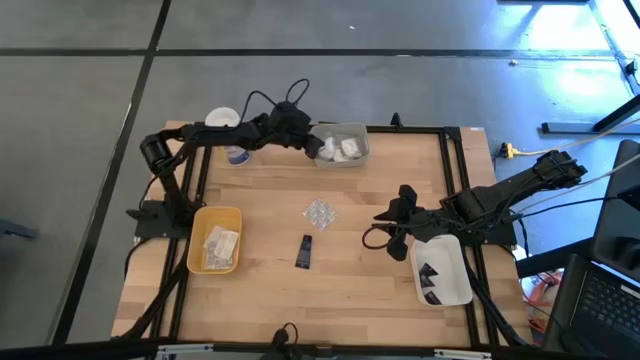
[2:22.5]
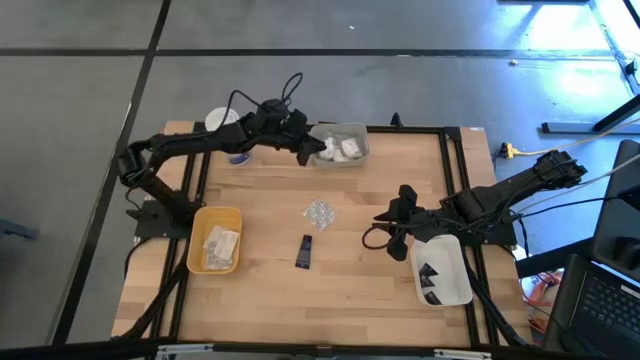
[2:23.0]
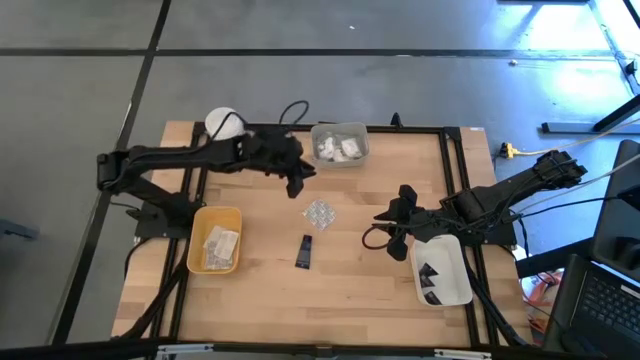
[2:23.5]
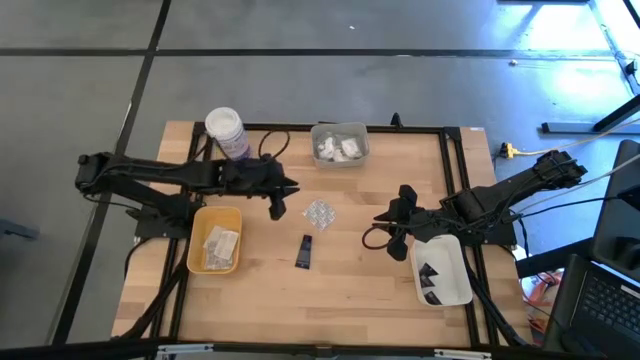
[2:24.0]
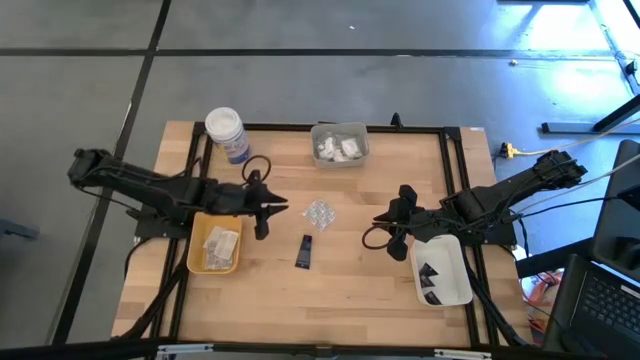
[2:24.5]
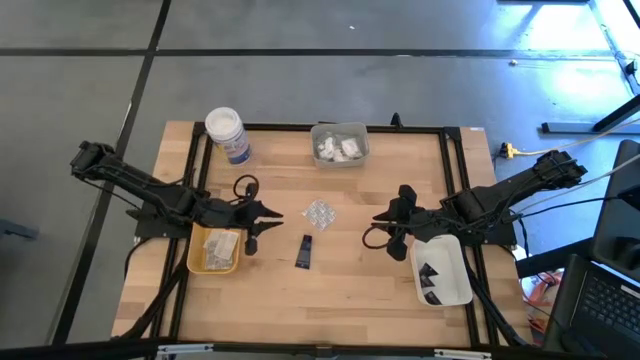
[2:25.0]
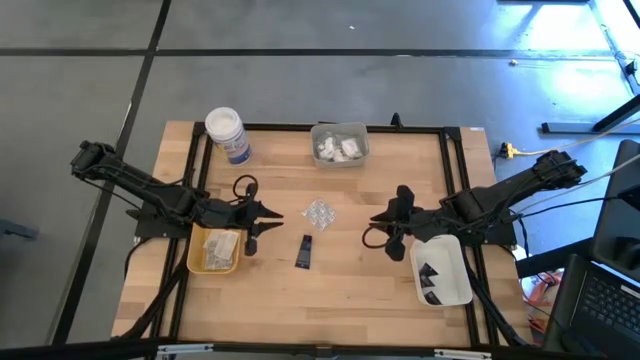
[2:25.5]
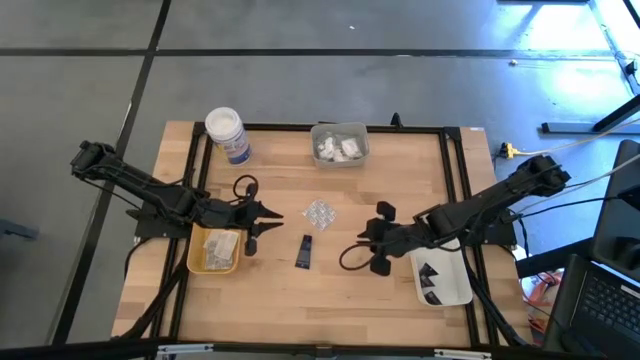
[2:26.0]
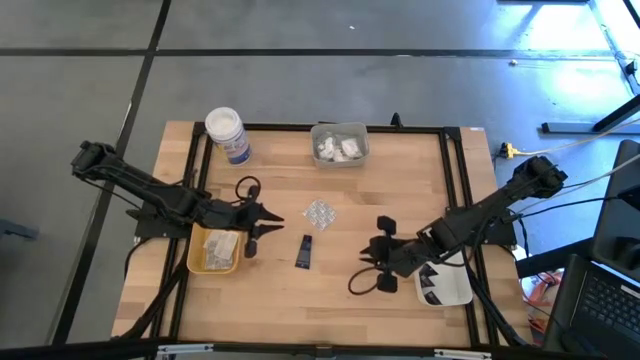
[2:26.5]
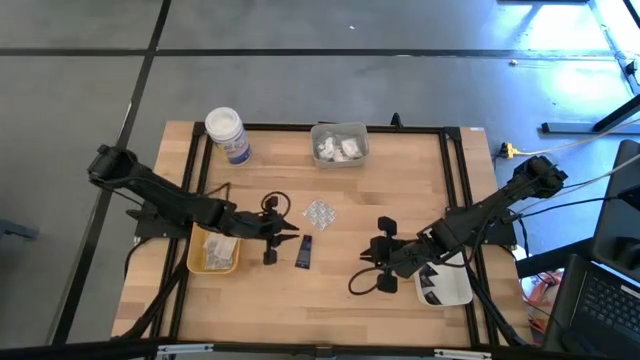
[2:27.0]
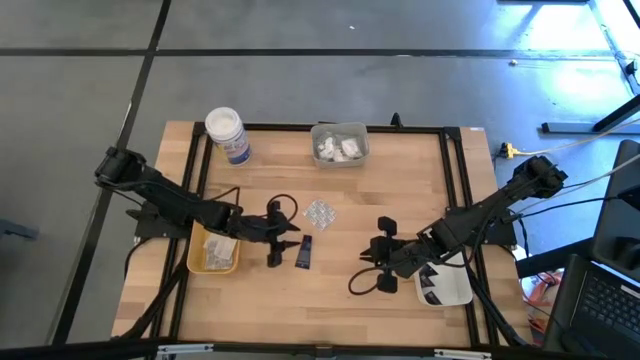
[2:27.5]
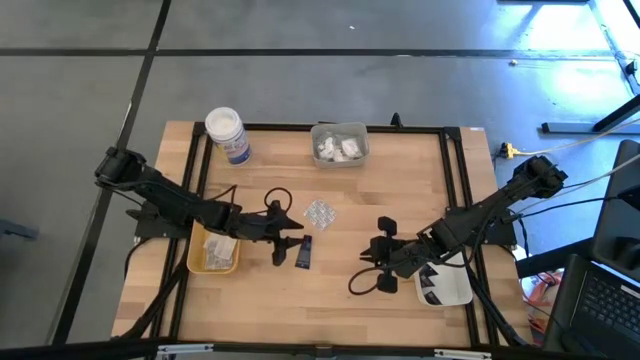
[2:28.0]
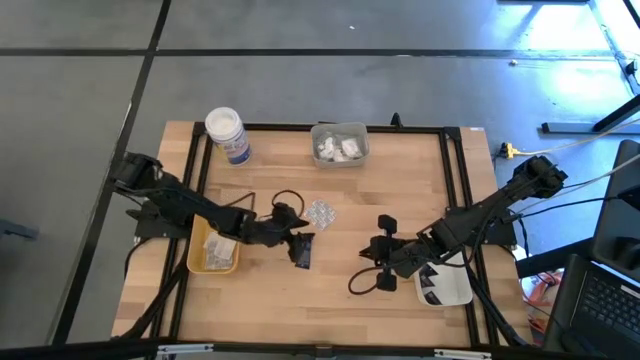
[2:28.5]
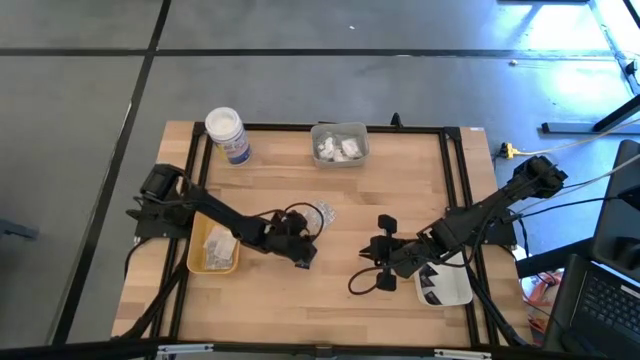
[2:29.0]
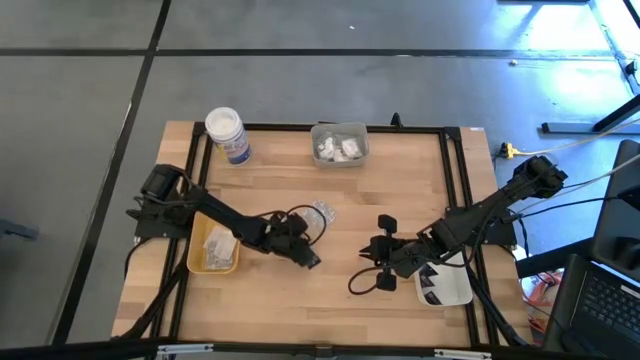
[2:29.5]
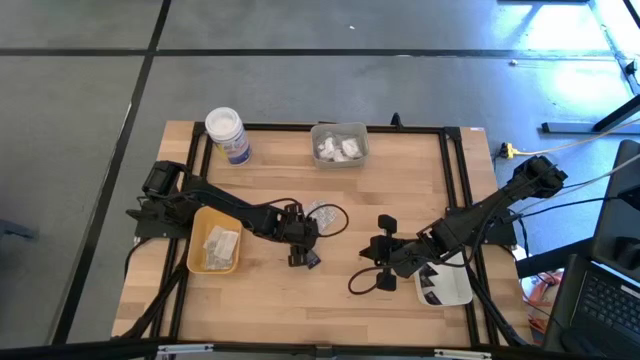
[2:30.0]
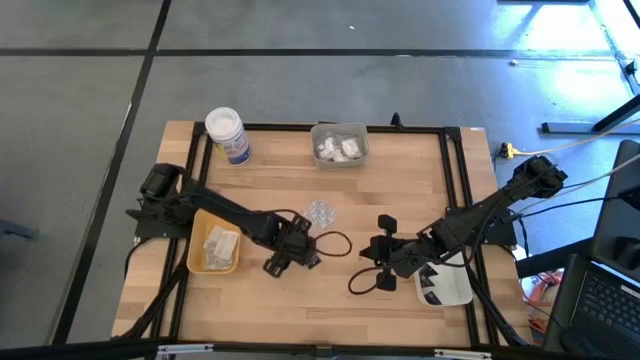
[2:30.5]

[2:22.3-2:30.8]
Task: Pick & Place Travel size toiletries
Put the blue shaving cream into the white bin

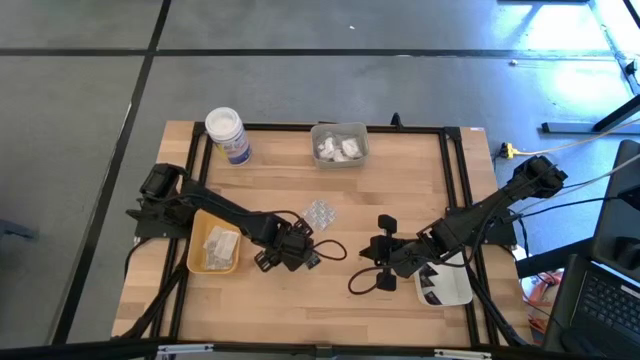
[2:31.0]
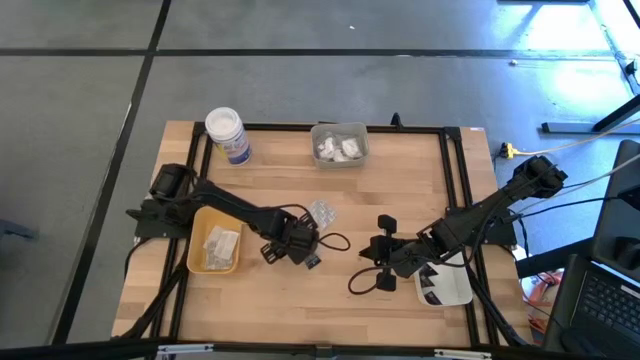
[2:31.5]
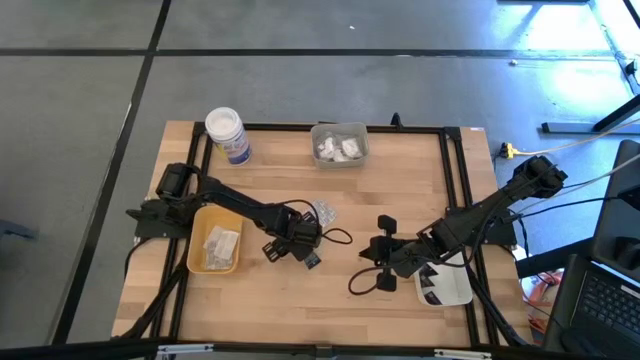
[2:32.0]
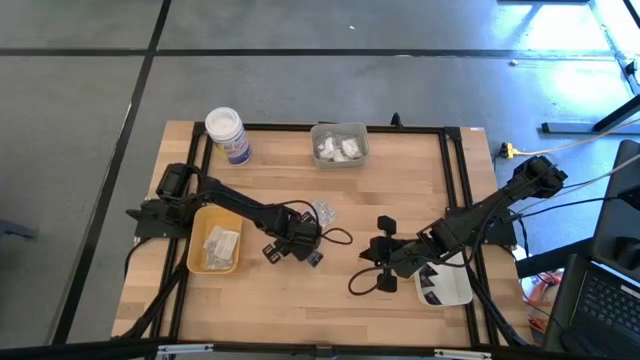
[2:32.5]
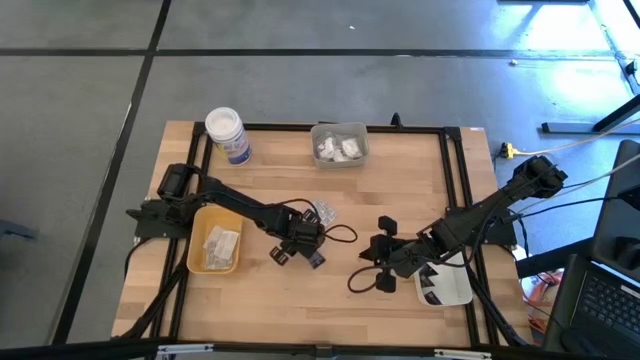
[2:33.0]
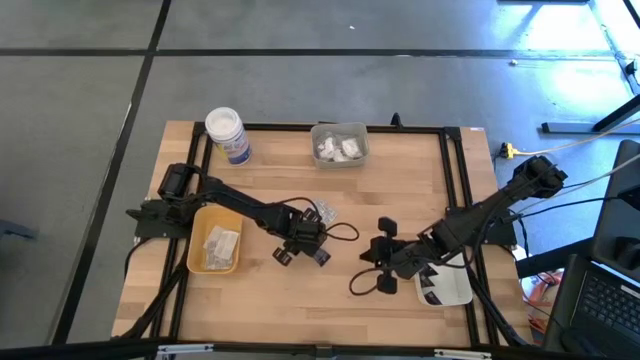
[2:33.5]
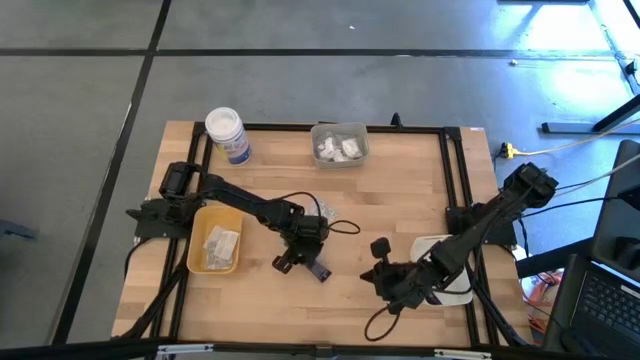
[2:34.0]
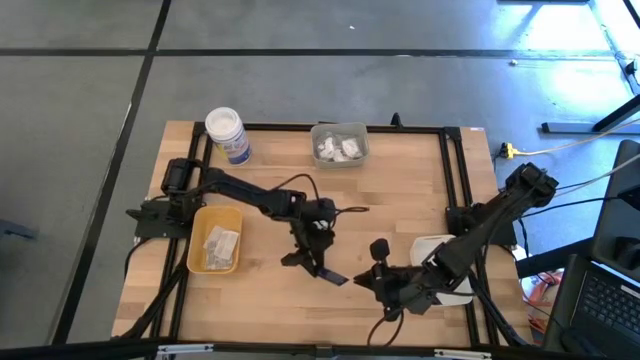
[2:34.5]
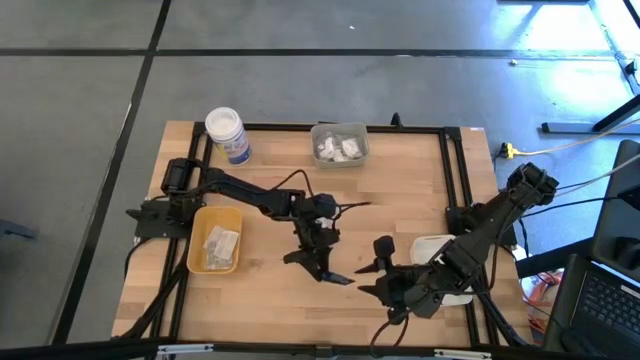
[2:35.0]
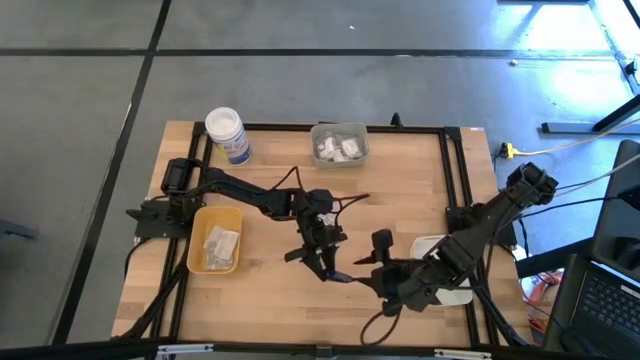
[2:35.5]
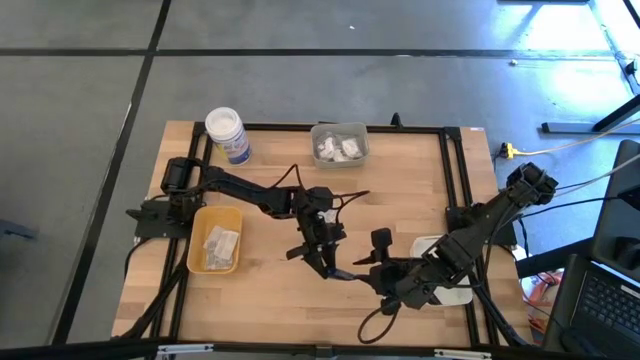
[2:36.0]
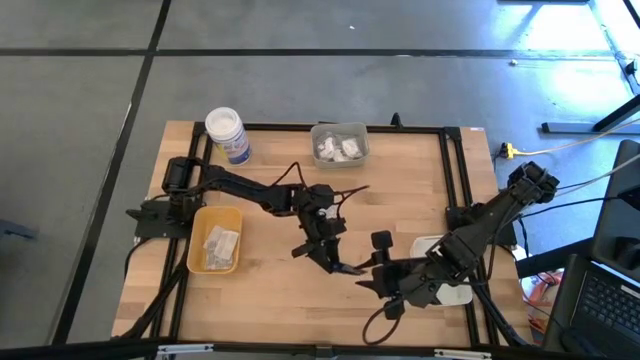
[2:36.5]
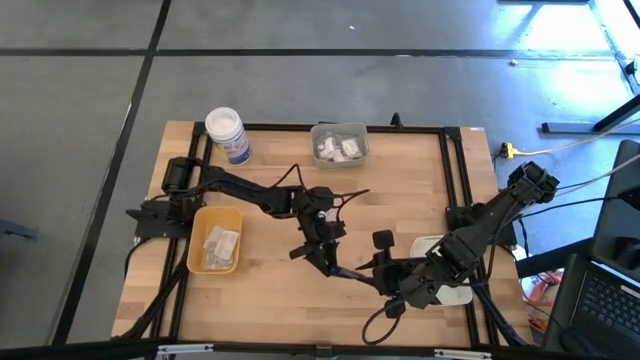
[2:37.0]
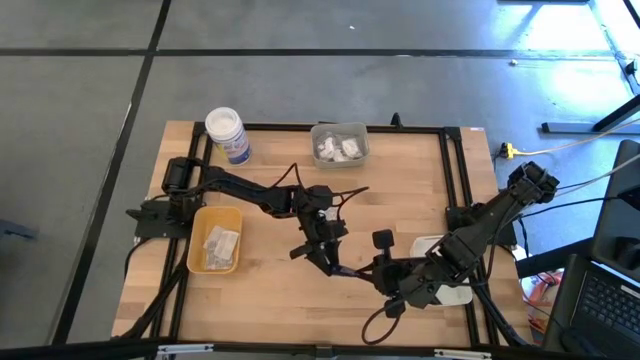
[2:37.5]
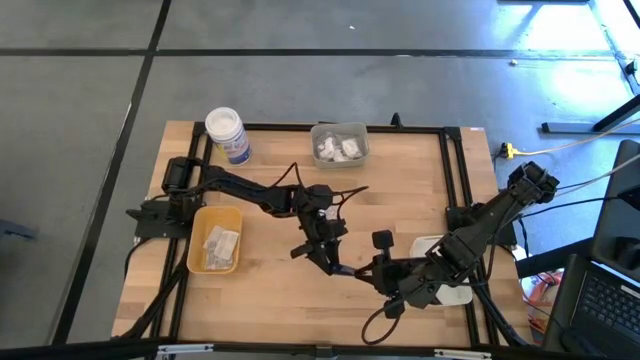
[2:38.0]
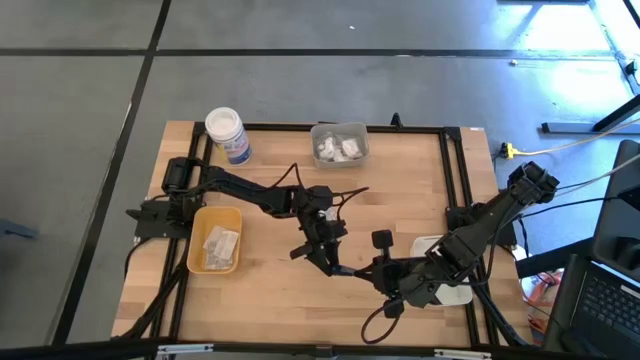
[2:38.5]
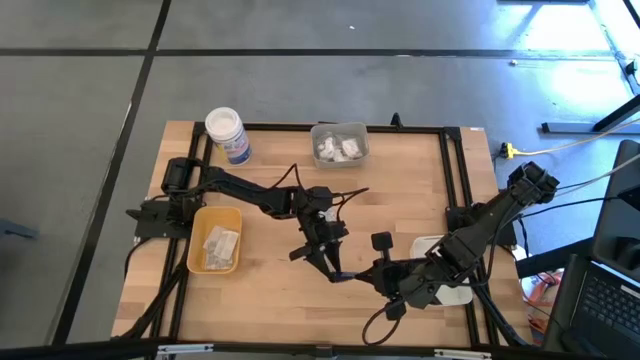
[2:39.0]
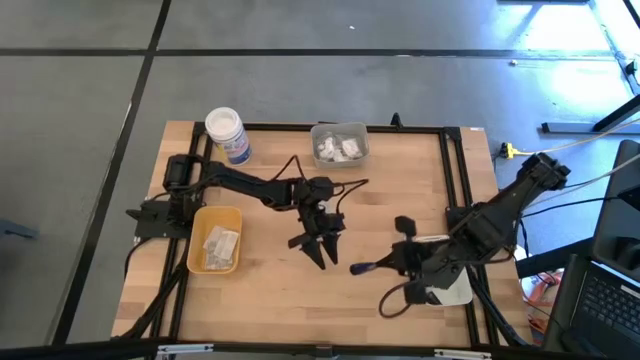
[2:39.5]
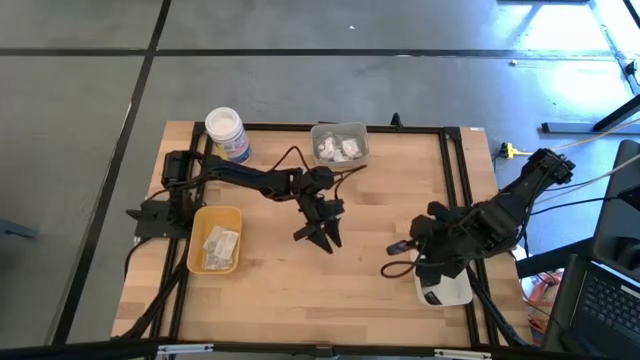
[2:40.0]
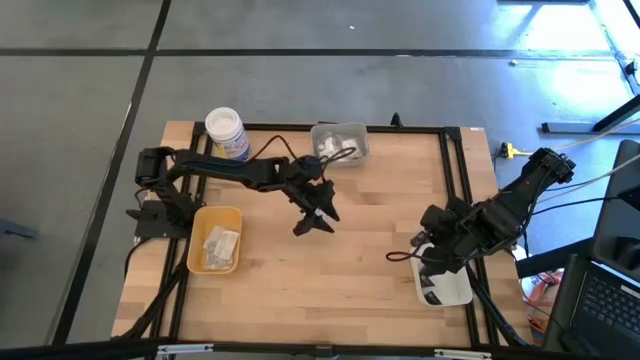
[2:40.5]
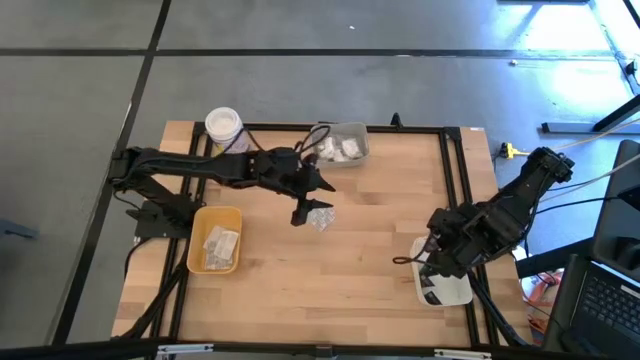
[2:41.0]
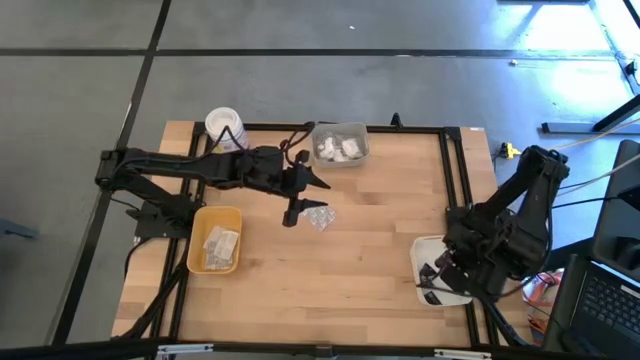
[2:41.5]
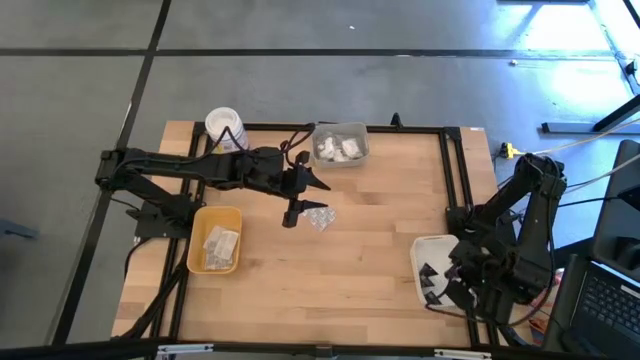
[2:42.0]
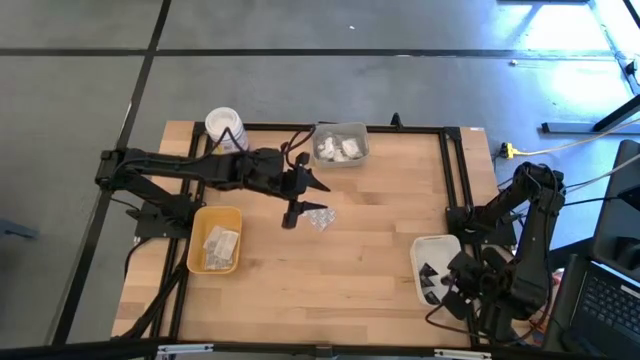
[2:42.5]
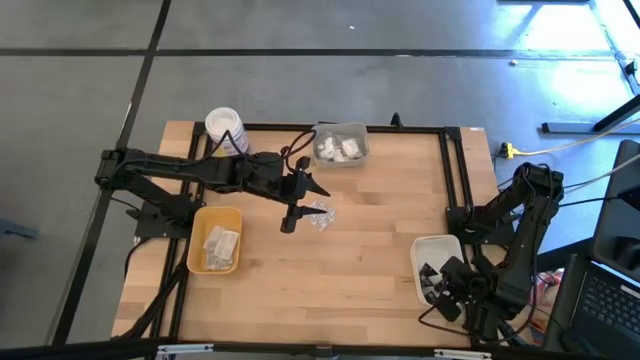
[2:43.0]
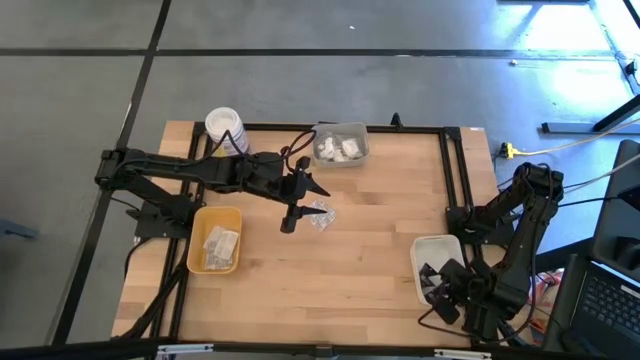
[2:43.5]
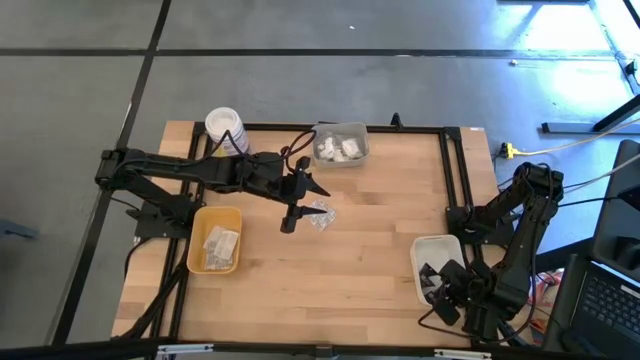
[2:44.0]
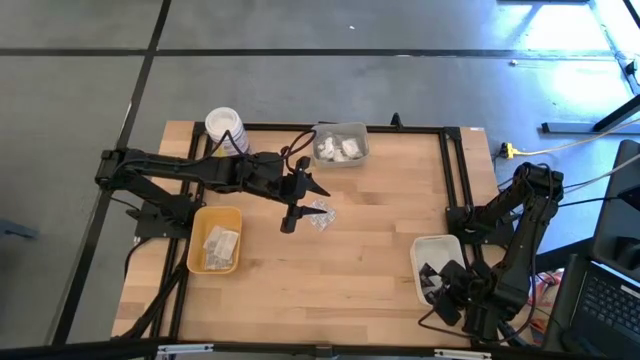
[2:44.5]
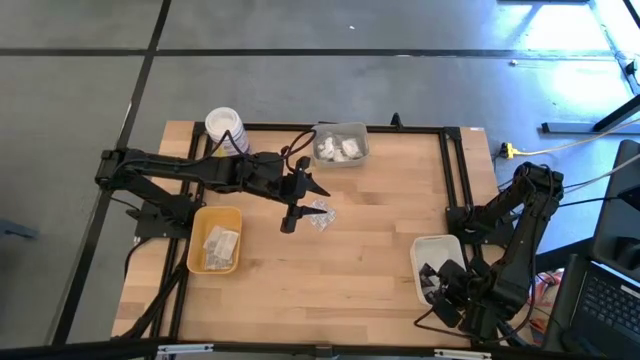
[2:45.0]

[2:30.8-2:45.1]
Put the blue shaving cream into the white bin
